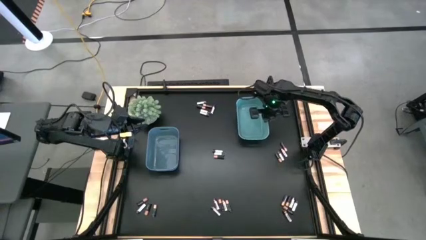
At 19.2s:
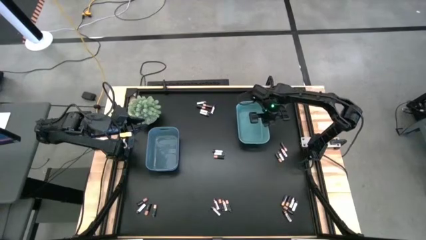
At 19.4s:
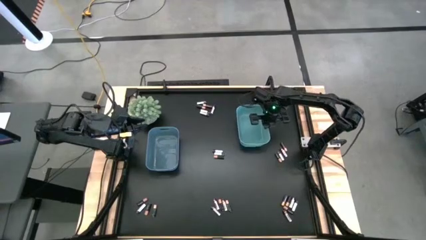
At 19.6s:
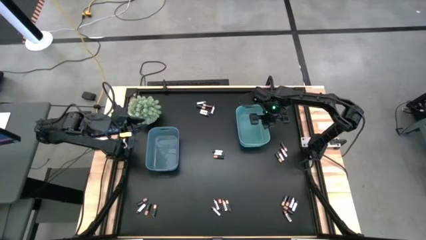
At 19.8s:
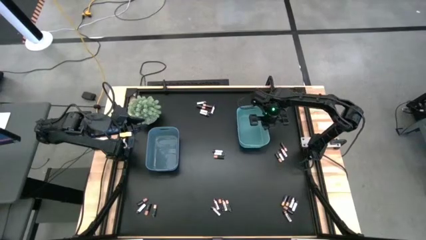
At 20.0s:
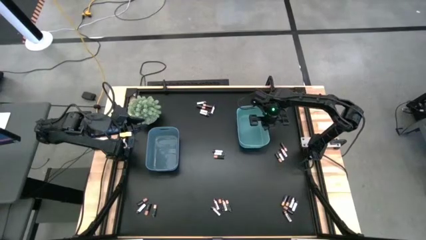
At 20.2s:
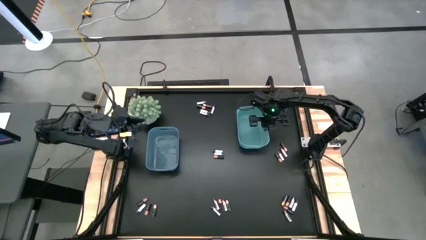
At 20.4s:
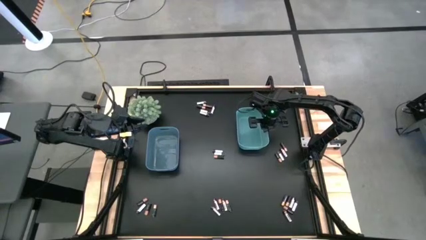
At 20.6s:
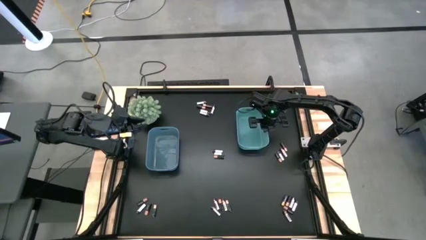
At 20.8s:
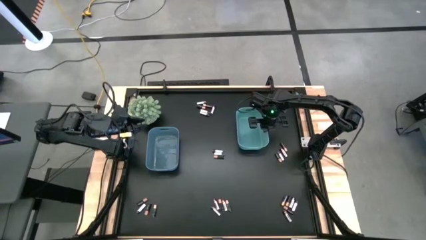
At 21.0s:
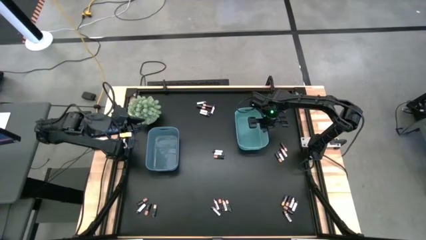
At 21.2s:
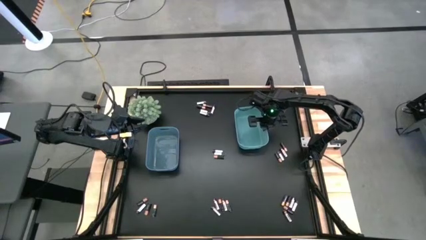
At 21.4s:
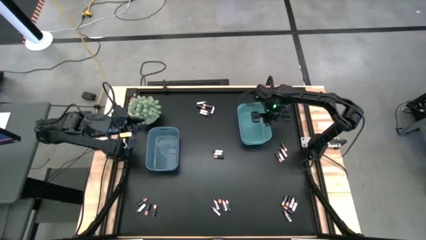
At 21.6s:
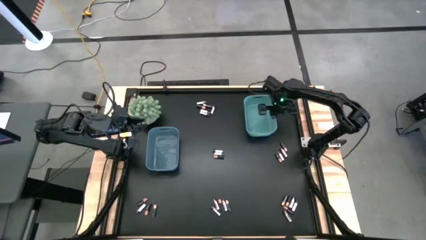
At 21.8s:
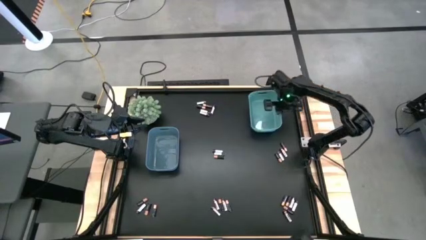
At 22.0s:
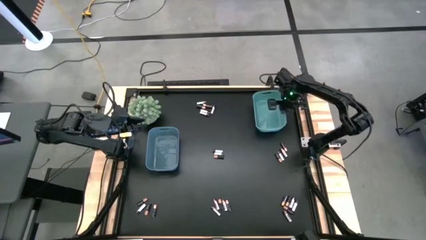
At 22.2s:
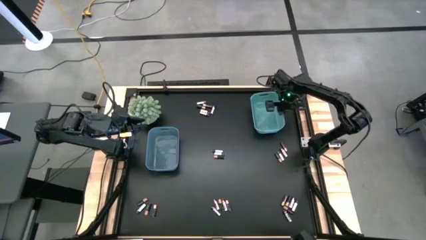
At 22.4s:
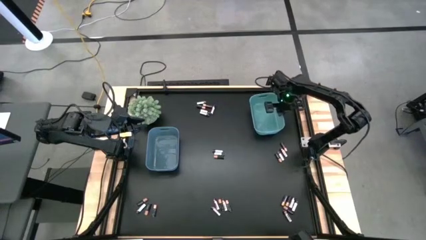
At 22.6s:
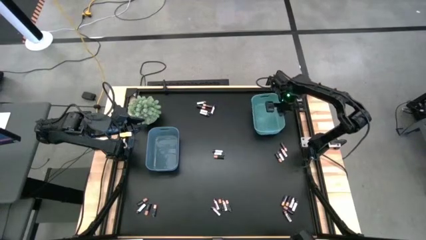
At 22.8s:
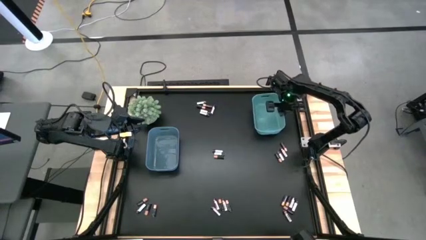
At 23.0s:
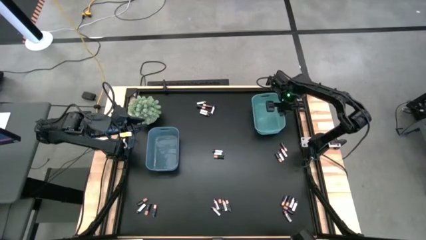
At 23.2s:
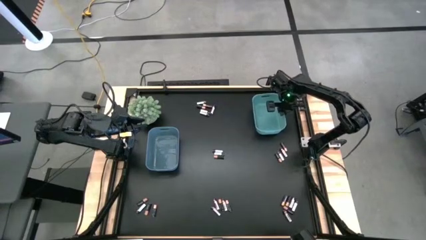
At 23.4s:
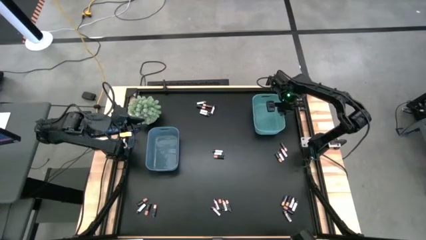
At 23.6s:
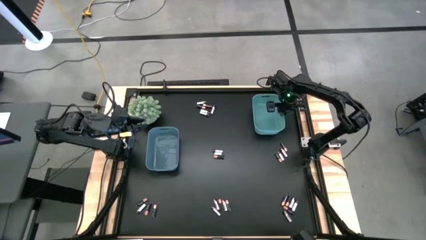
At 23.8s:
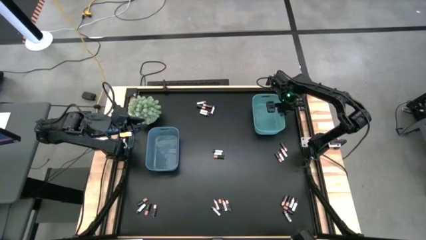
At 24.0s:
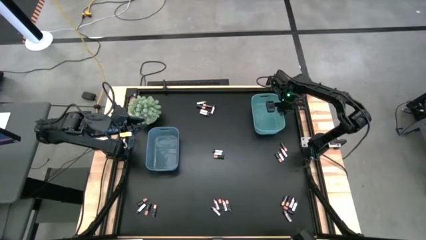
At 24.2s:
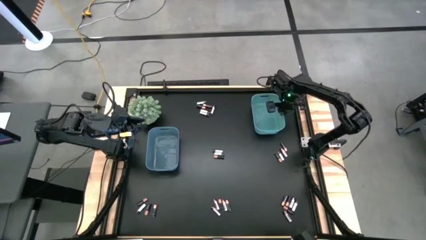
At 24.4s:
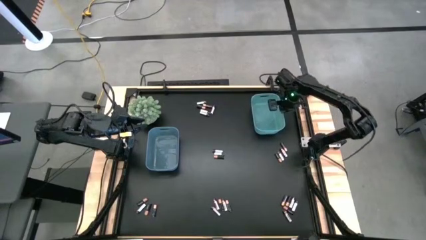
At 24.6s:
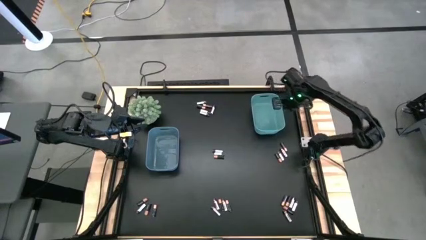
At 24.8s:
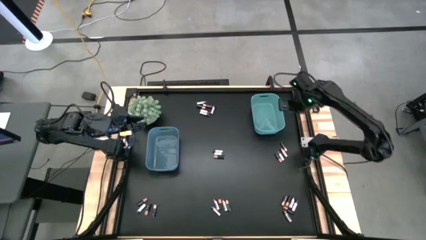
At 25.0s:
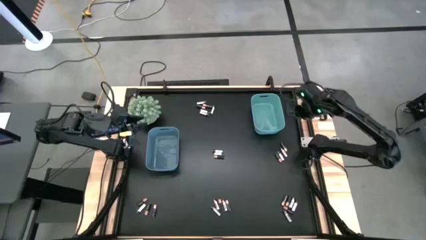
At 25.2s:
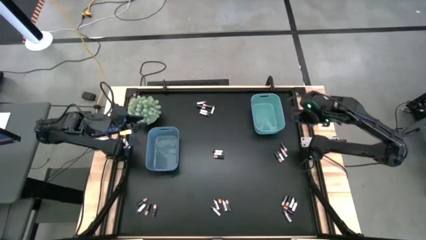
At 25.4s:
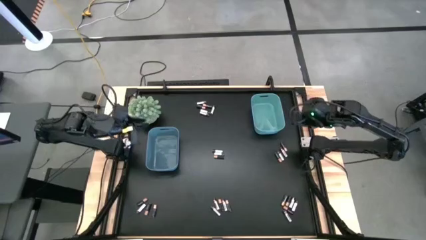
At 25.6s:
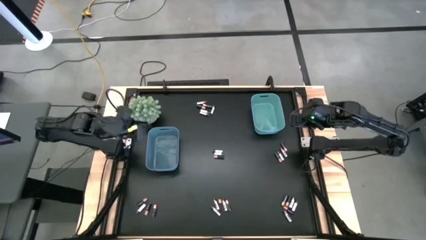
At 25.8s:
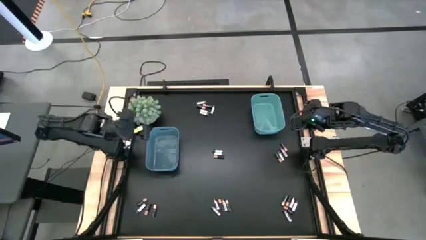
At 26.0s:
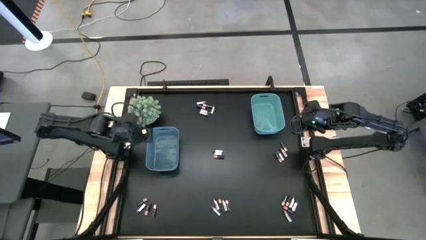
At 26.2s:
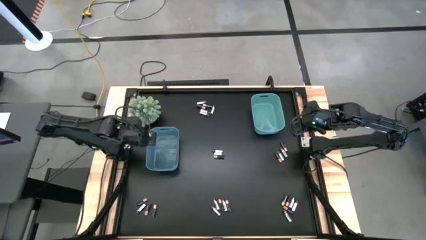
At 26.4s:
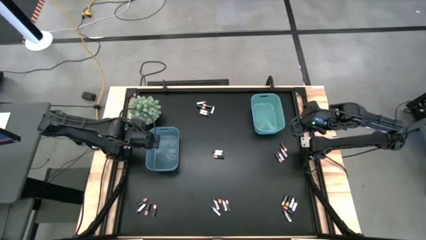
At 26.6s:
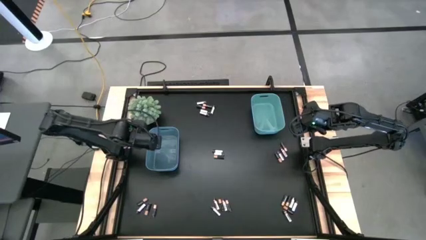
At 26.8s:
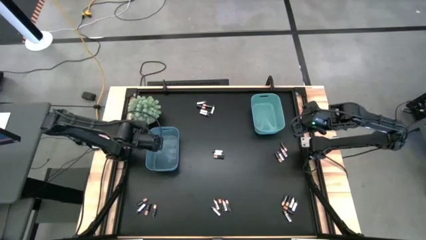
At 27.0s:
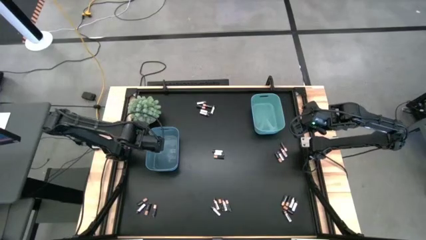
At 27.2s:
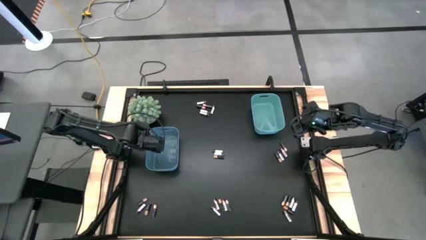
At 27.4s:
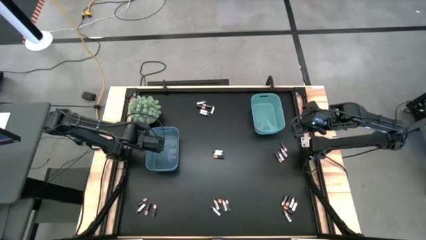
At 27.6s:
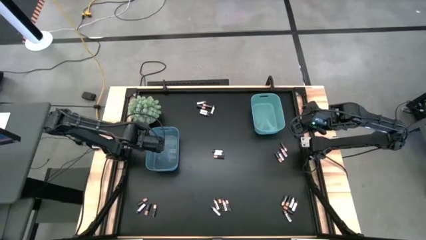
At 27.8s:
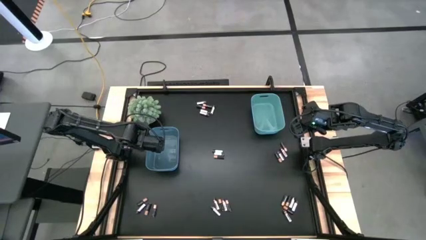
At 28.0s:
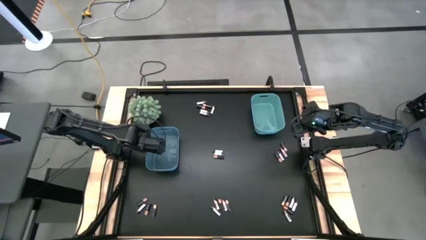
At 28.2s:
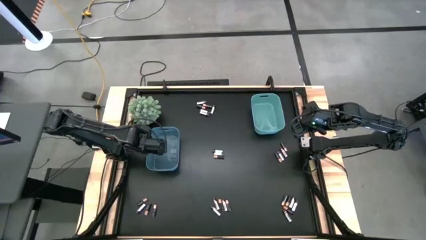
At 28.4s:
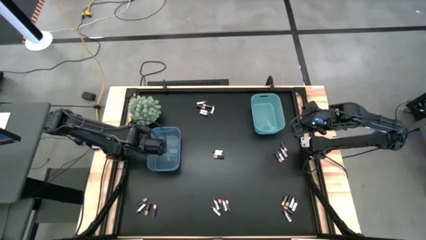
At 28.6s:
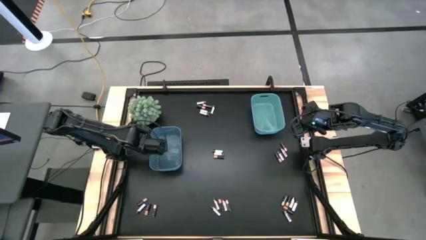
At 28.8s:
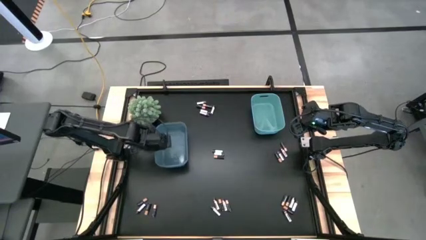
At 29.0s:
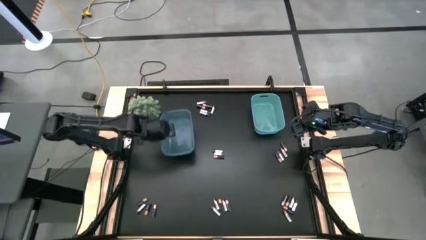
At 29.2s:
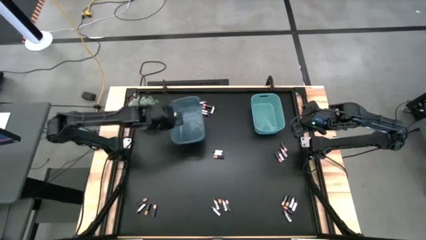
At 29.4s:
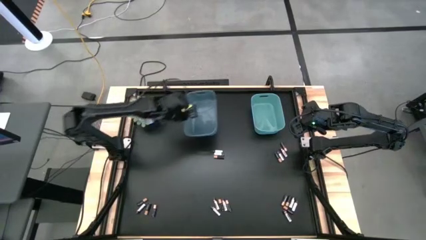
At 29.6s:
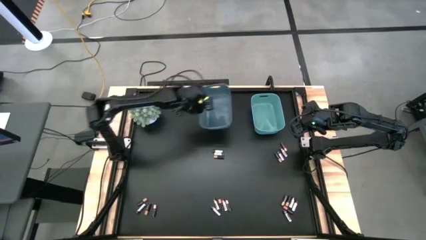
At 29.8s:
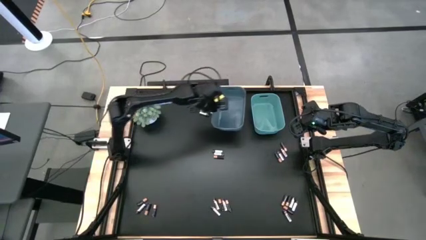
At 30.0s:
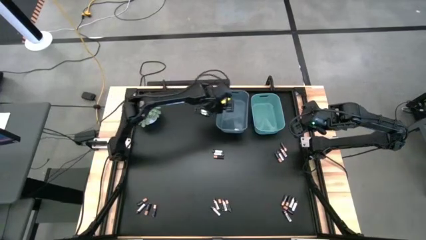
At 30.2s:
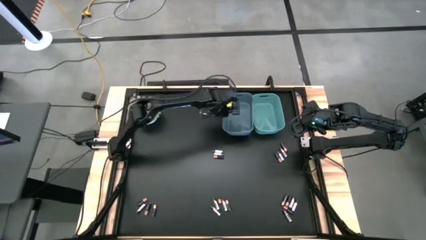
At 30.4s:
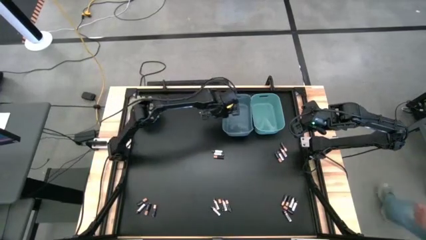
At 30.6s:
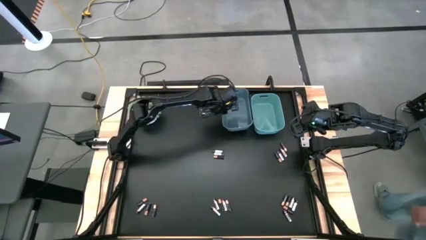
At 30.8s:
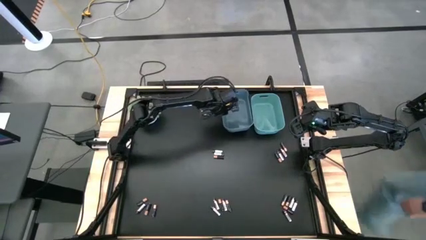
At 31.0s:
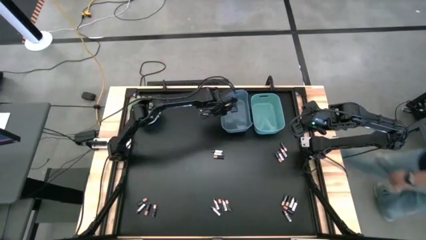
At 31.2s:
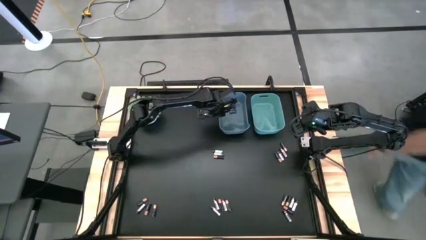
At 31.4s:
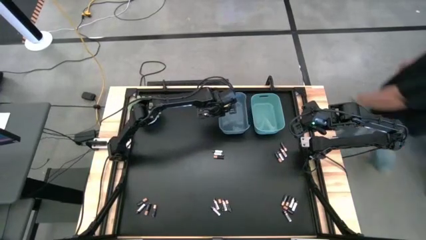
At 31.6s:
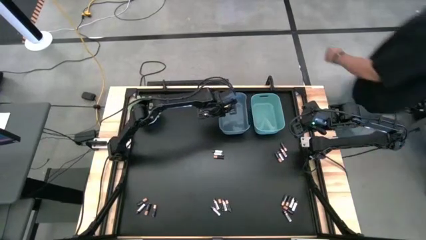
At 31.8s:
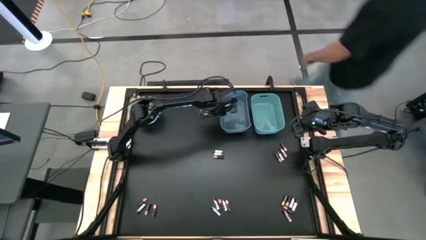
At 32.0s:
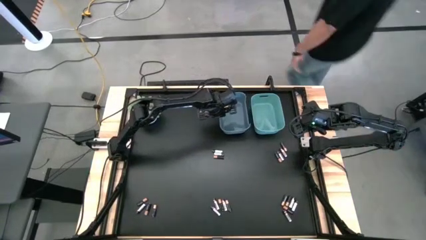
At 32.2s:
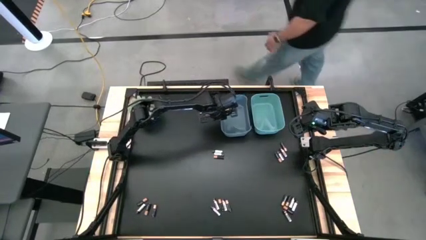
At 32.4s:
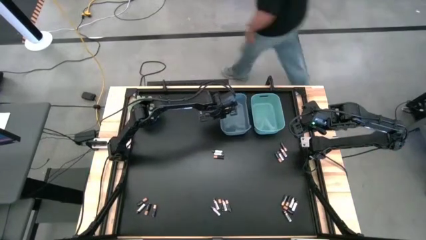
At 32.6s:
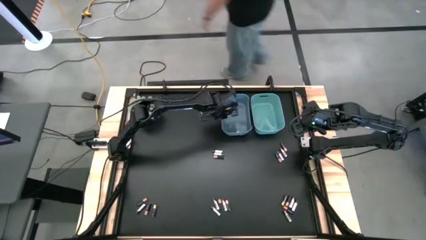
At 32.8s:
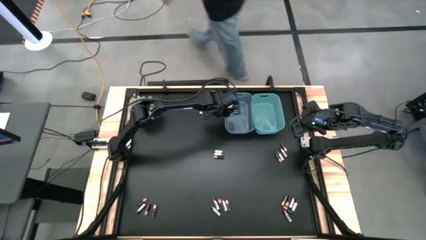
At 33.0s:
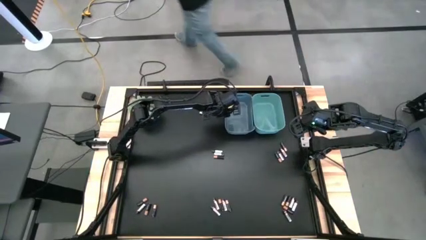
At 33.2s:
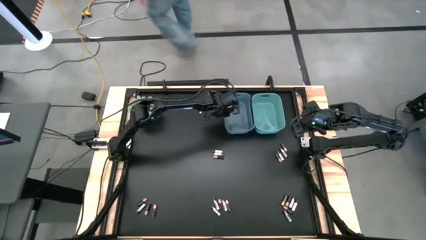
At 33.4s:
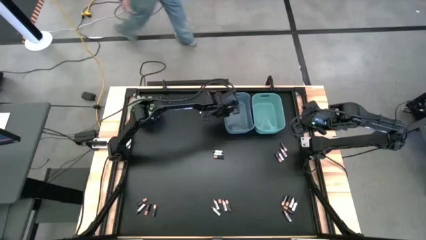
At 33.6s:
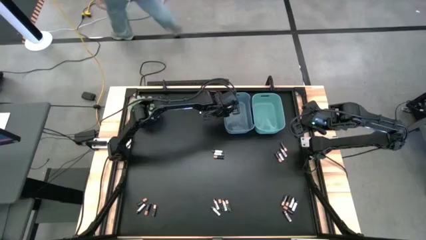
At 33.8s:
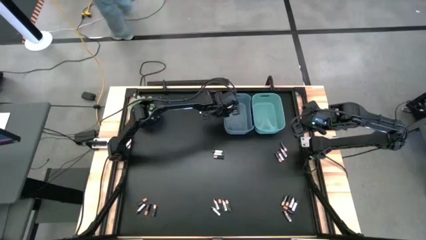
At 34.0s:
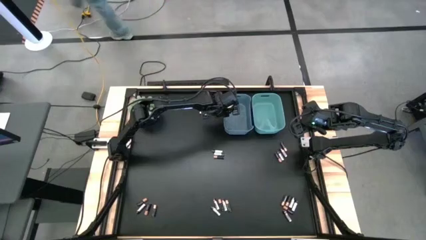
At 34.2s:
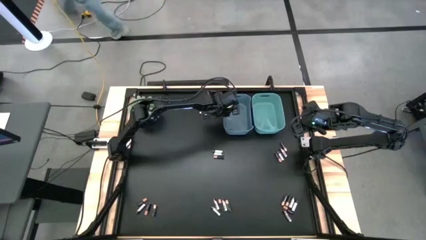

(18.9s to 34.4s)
Task: Sort batteries
Prepare the bins

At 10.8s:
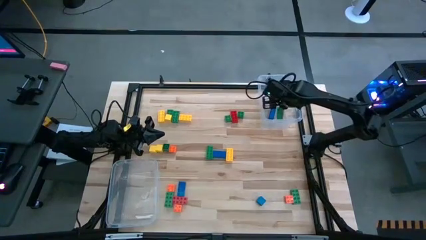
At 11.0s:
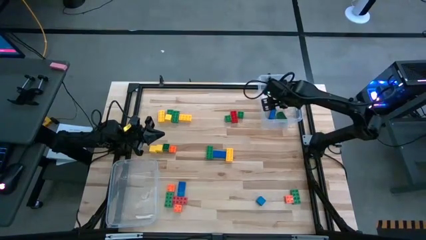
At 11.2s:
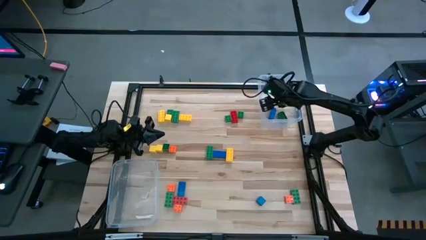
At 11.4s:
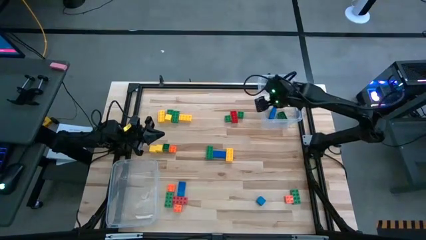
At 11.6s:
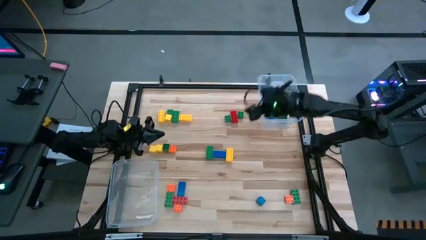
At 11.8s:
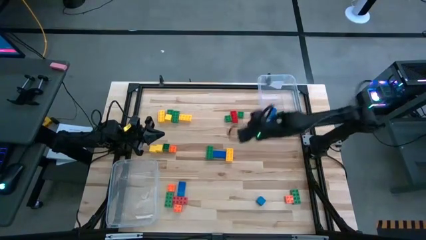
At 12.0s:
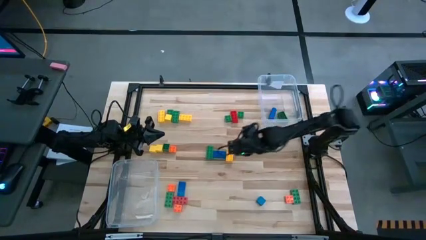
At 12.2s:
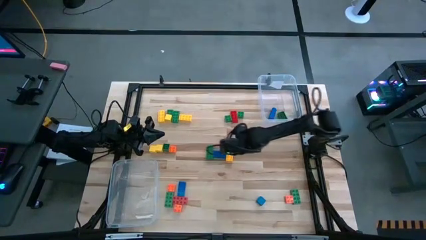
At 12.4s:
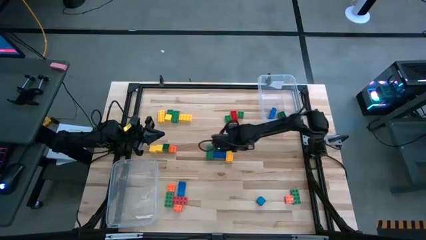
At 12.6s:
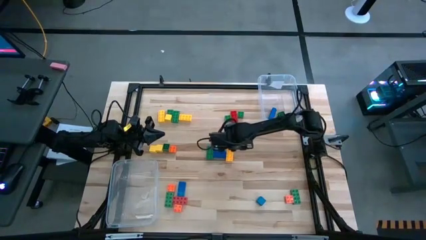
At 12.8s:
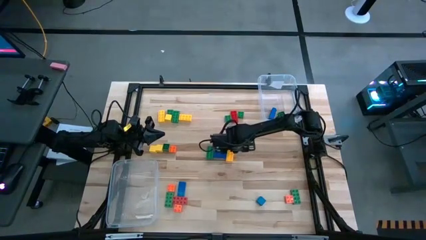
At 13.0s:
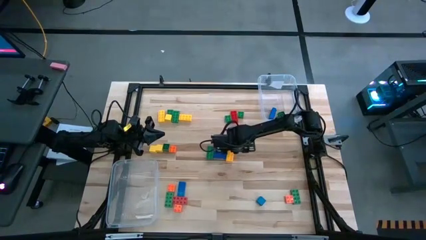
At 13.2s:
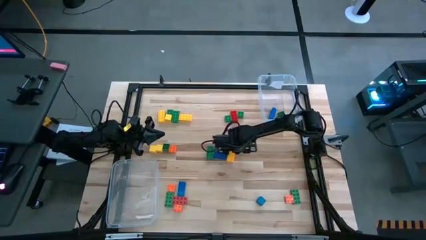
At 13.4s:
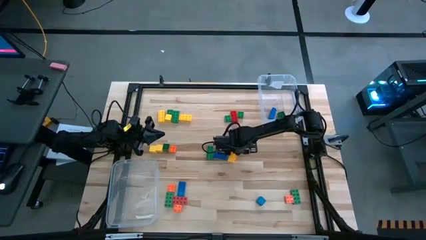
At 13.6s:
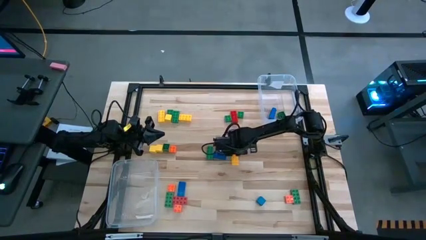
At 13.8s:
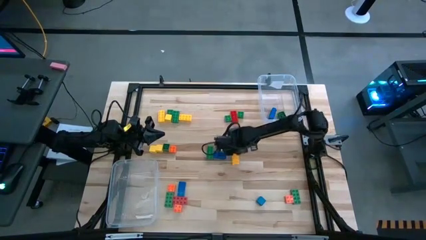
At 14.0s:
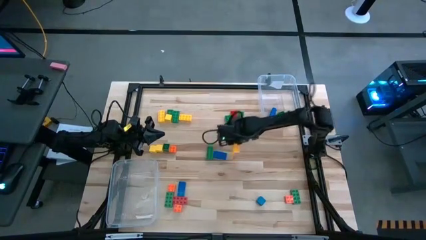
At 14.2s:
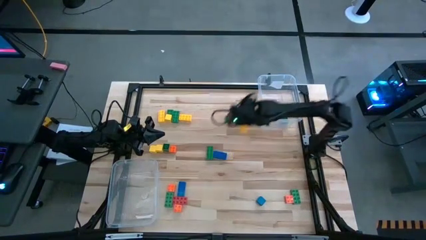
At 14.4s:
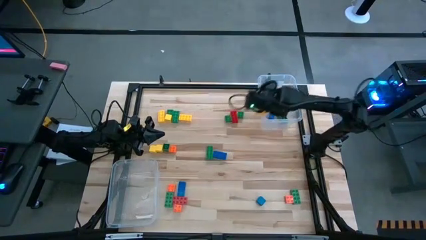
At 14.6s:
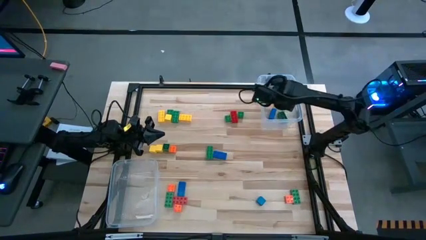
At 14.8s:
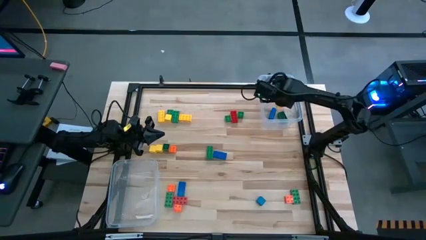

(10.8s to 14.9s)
Task: Sort blocks by size
Put the right large yellow game piece into the right transparent bin
